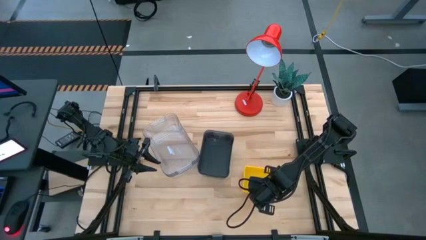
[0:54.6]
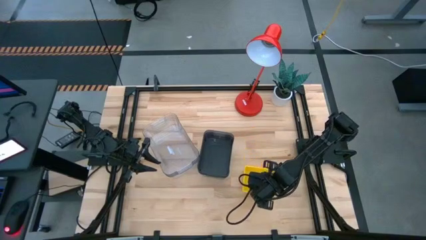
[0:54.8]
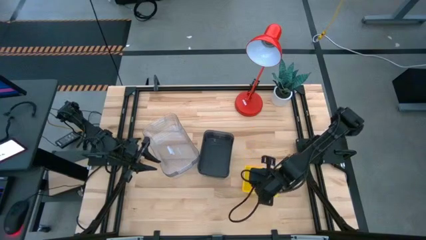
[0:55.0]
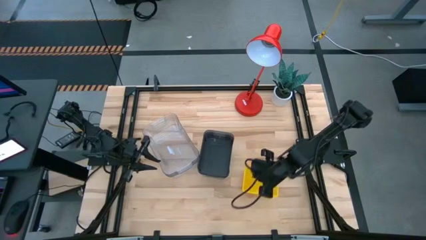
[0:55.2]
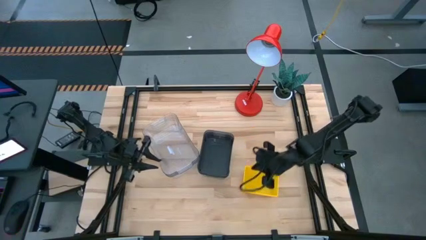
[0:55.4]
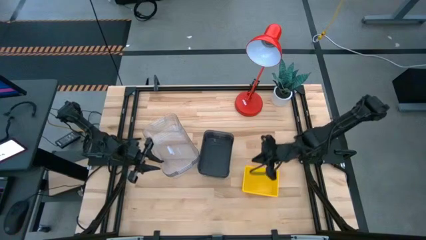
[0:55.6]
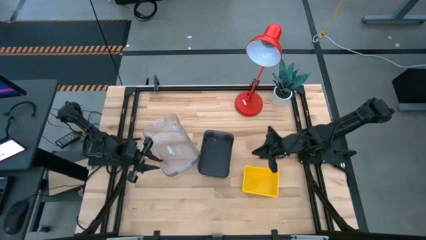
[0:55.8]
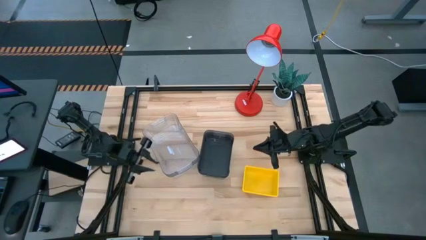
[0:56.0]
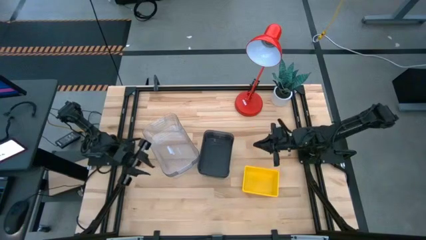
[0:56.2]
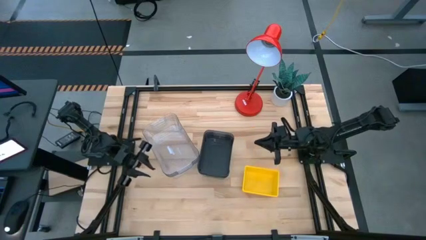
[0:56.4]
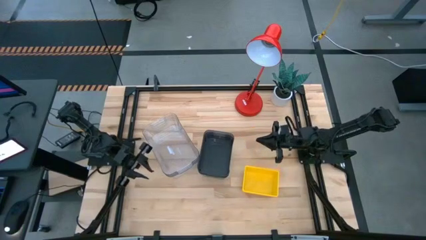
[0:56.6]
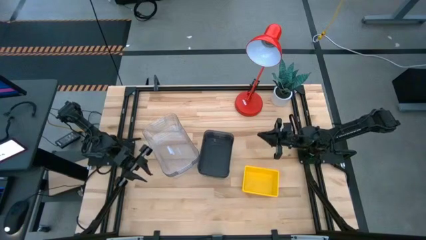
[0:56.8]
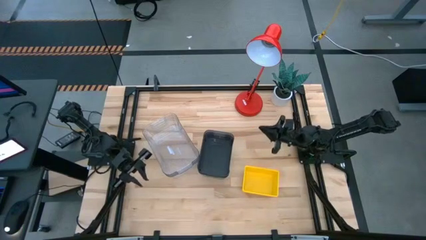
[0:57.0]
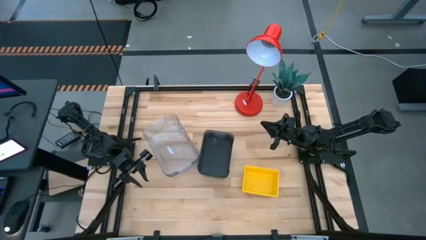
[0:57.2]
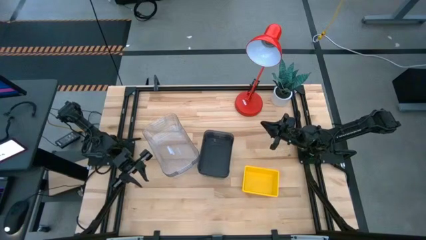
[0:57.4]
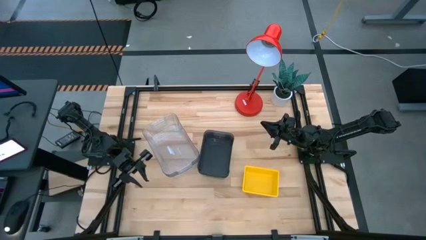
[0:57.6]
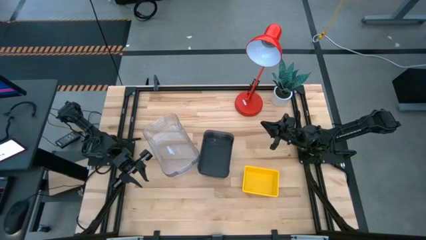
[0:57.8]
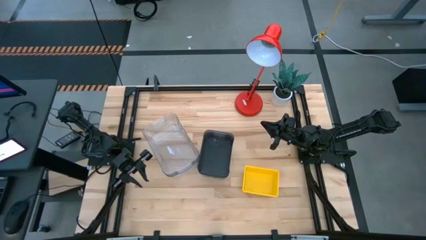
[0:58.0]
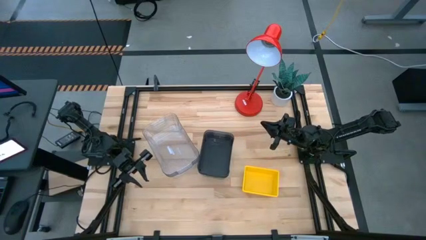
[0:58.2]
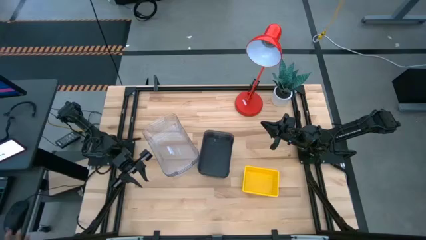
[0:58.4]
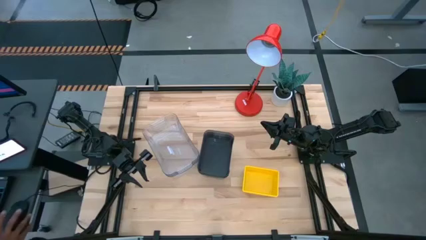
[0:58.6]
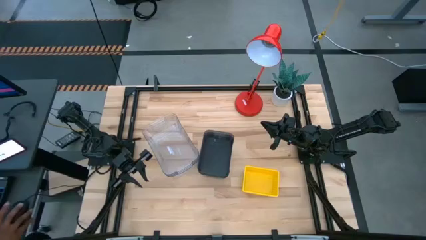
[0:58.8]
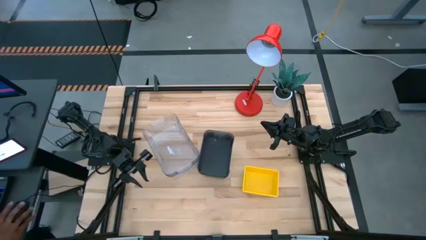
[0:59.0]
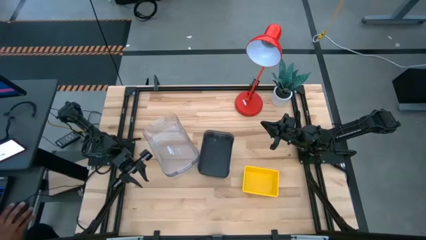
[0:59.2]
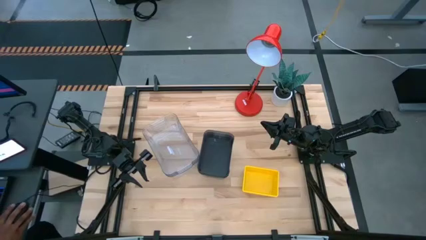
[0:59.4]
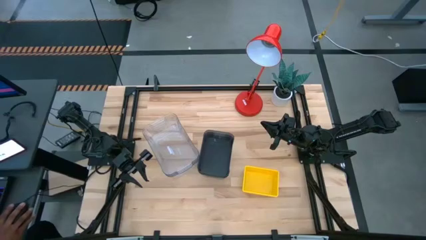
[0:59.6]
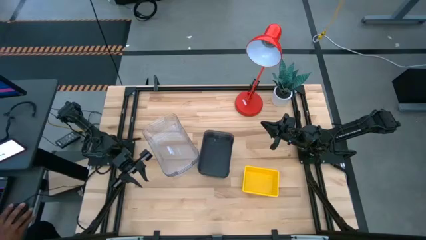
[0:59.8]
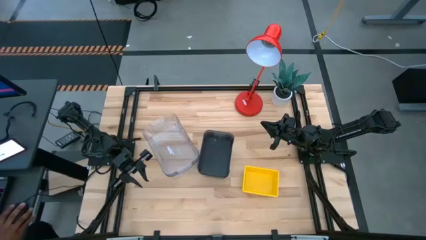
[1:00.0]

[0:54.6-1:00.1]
Return to Home Position

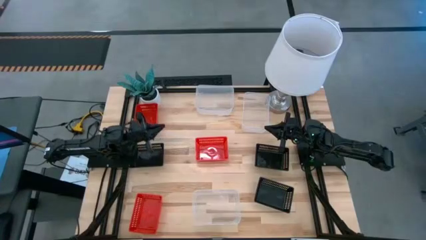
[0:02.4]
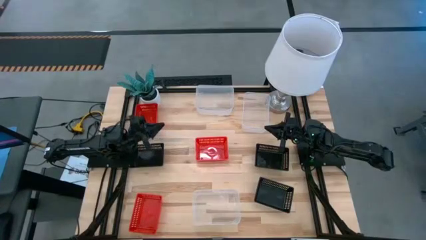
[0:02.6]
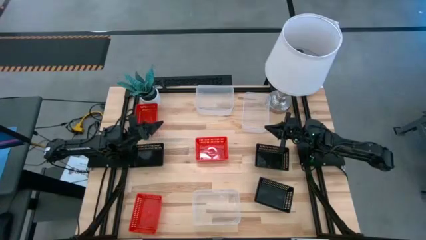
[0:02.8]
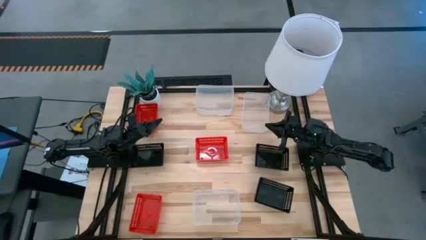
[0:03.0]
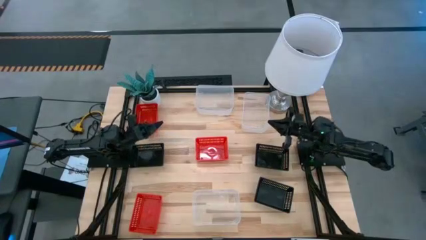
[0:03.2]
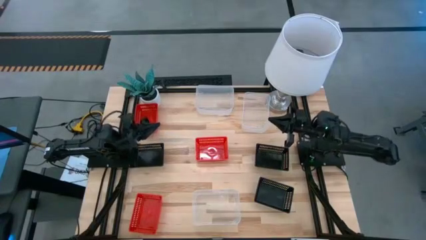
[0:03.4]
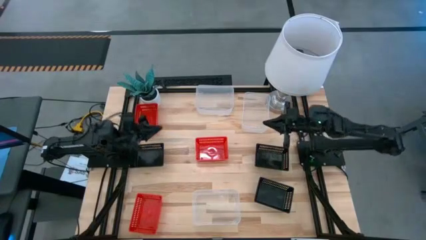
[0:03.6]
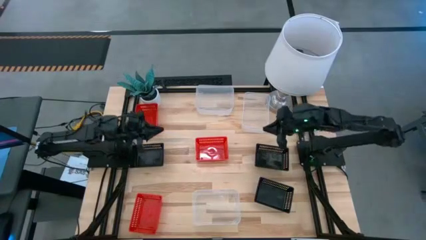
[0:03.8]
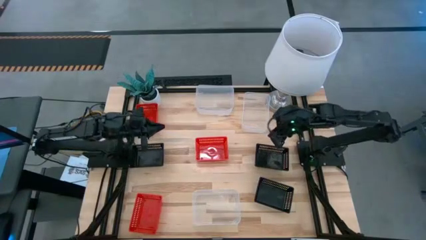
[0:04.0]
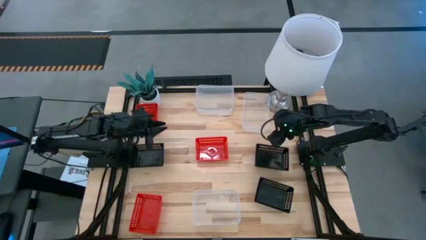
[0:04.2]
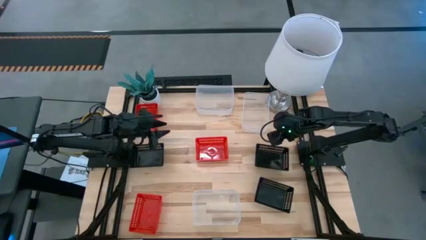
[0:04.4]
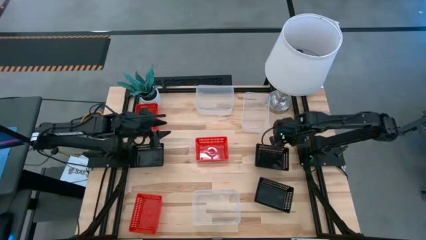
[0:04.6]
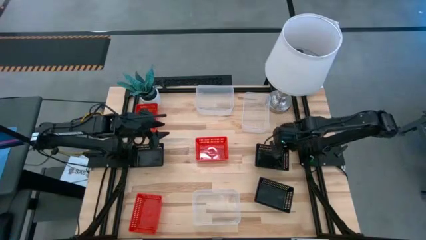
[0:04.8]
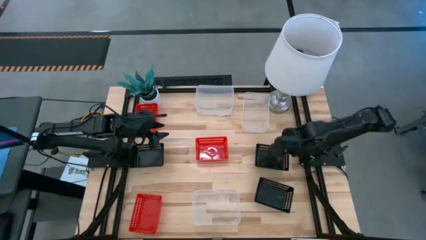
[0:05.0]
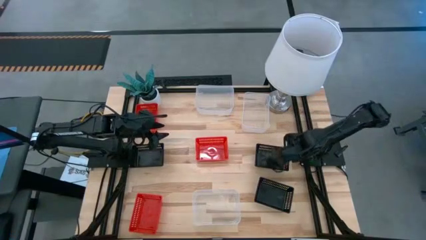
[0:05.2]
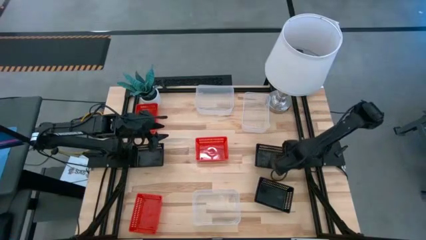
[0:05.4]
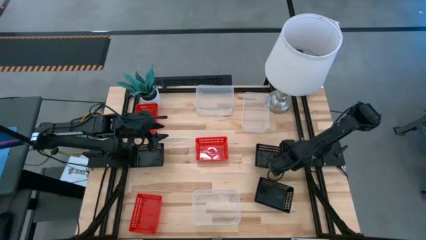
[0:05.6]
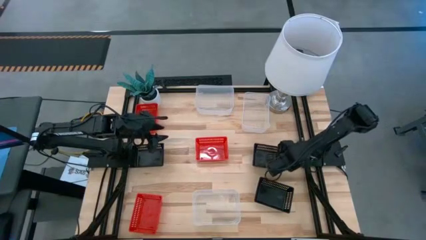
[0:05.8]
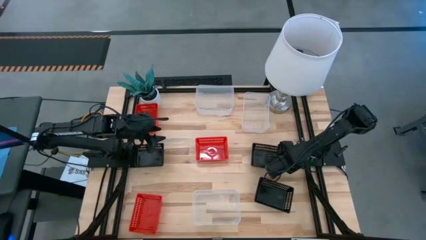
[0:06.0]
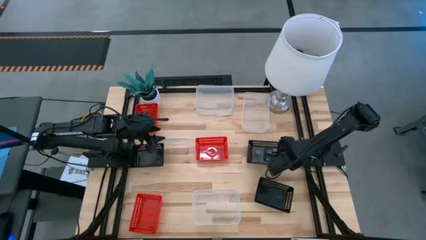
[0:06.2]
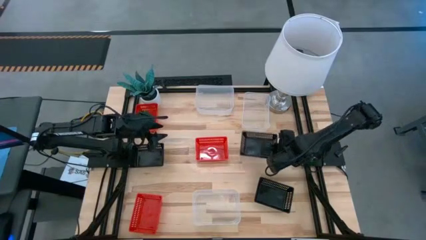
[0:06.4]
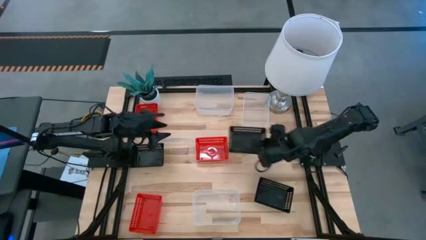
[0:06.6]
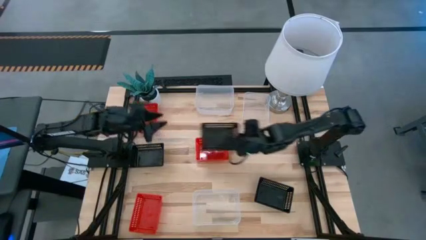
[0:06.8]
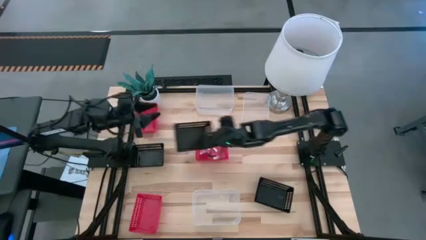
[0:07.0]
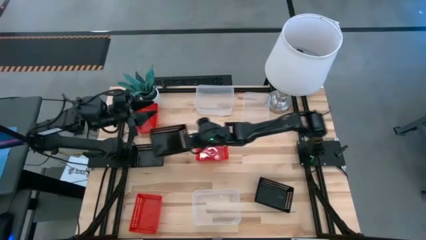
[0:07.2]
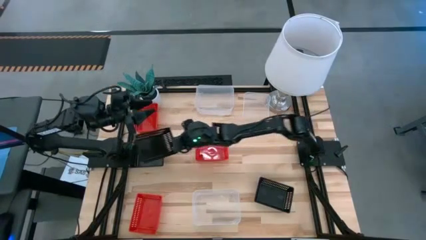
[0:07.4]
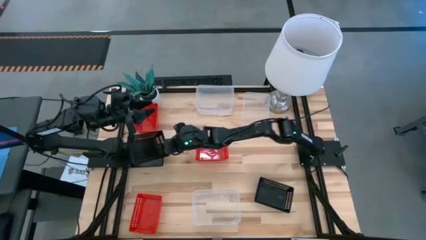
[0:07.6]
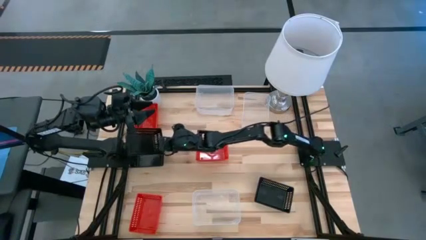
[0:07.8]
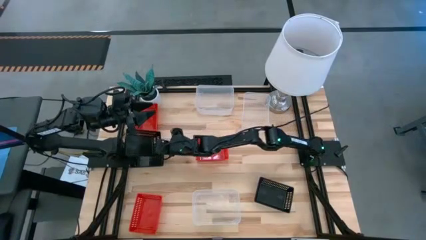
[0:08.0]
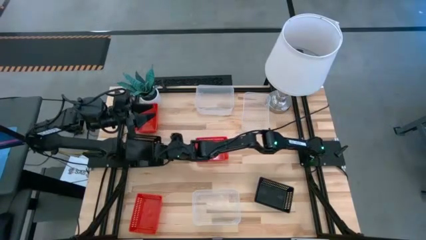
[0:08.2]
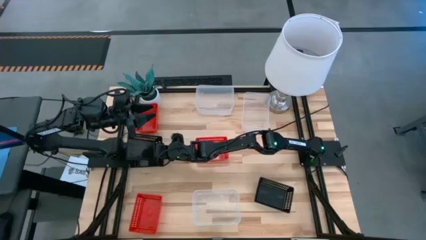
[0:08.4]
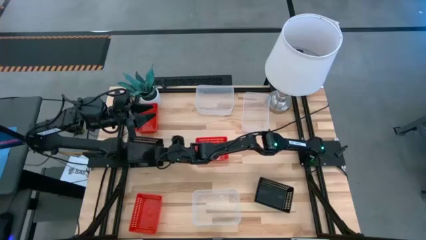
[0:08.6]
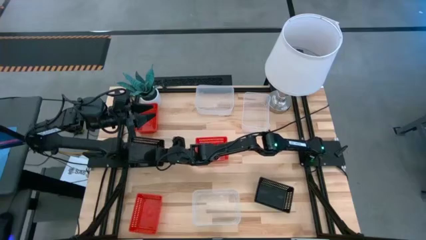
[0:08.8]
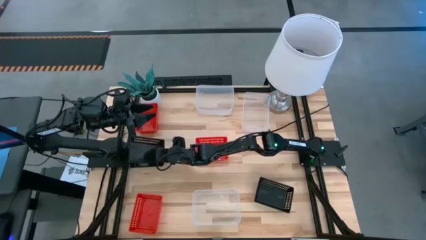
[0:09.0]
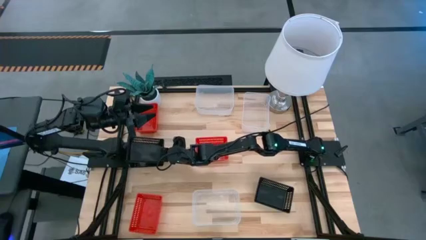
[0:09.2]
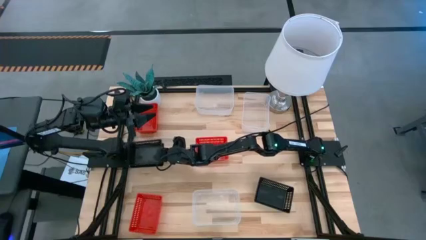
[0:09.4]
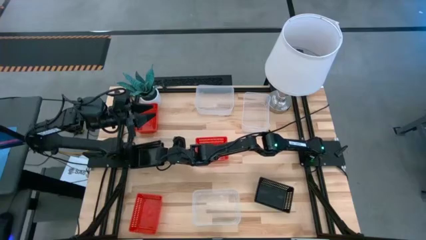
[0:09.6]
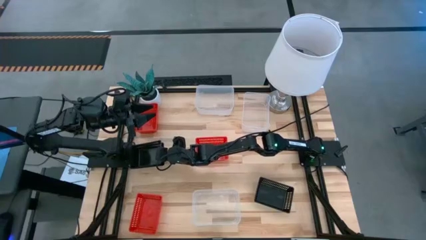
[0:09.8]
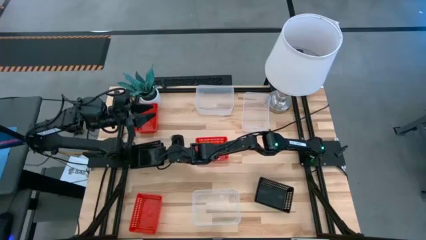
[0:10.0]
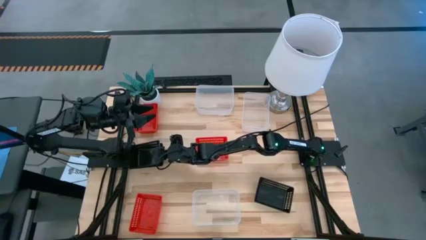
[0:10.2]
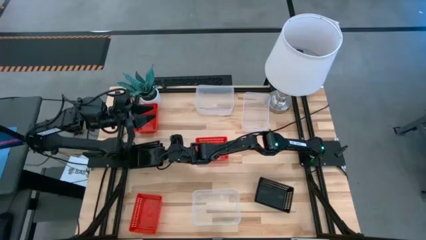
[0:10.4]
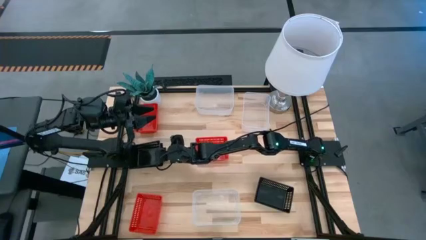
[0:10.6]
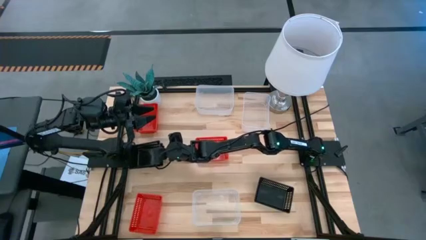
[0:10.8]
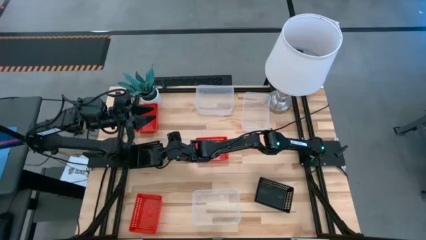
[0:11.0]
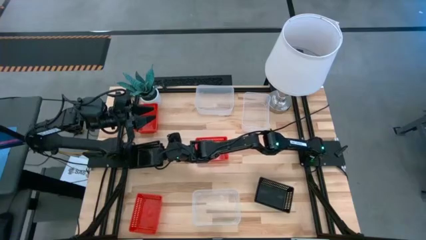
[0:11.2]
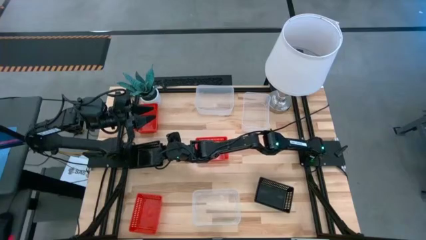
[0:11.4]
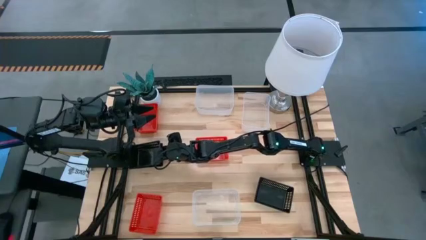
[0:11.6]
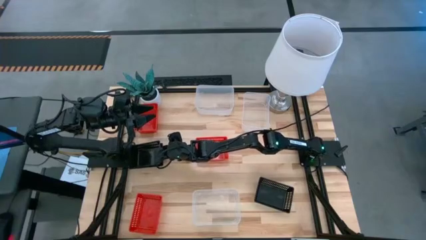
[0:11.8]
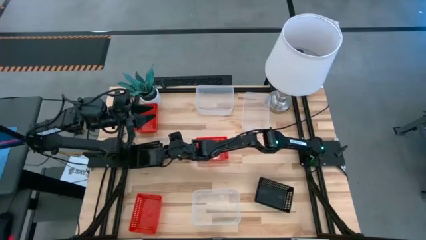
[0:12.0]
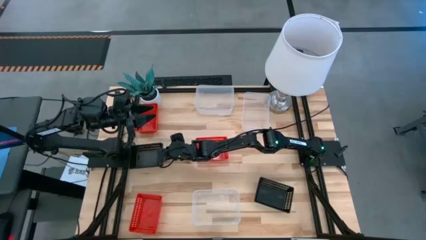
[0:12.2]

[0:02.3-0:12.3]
Stack the top right black bin on the top left black bin
